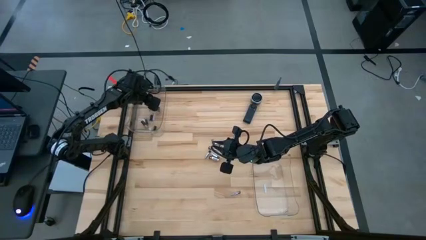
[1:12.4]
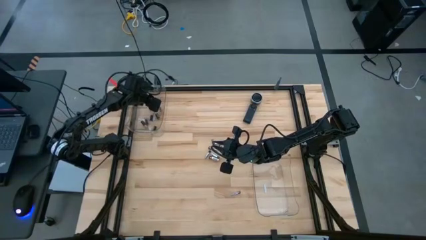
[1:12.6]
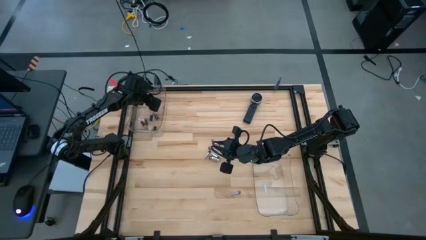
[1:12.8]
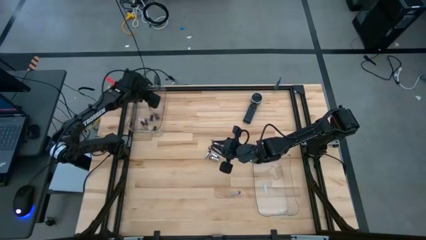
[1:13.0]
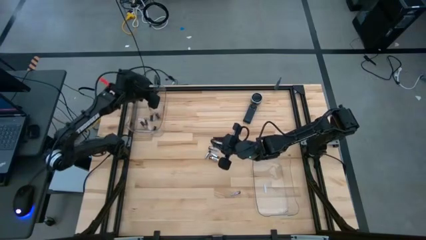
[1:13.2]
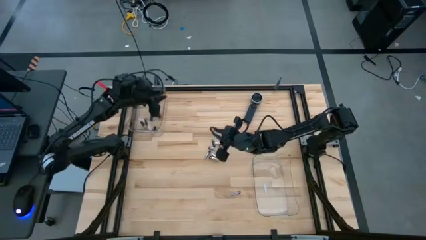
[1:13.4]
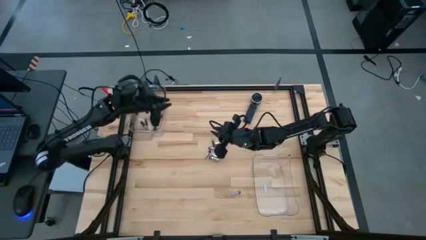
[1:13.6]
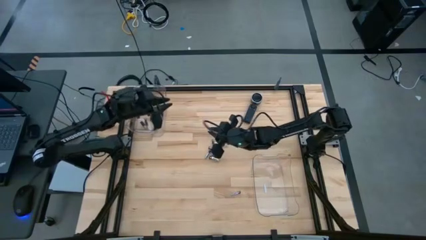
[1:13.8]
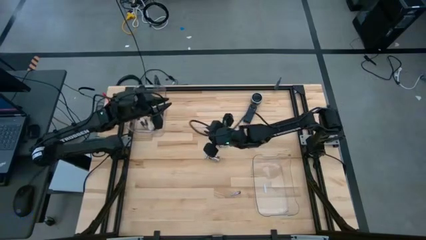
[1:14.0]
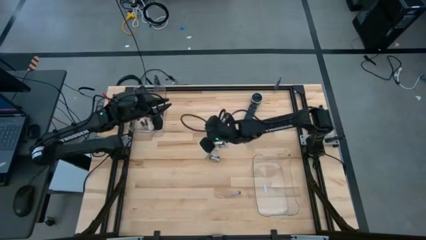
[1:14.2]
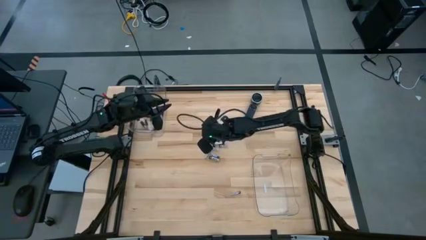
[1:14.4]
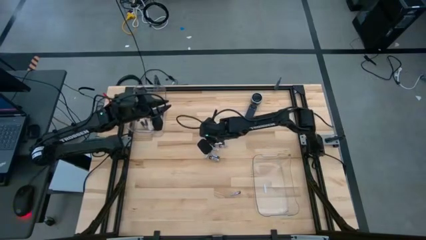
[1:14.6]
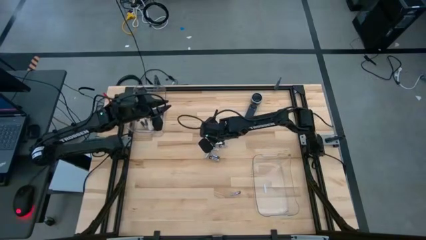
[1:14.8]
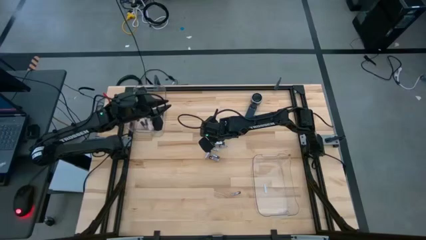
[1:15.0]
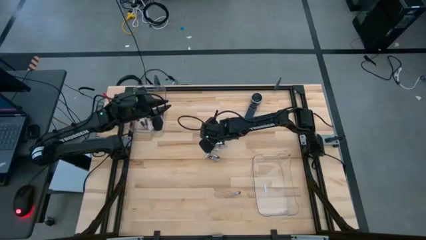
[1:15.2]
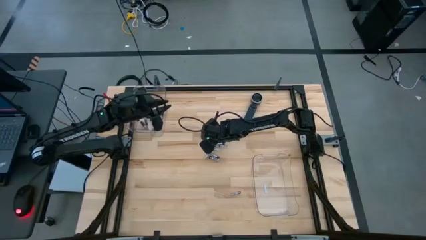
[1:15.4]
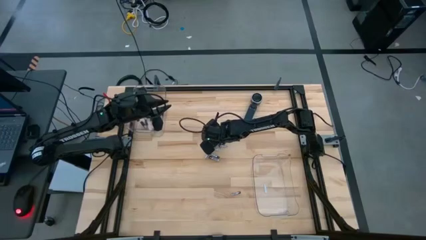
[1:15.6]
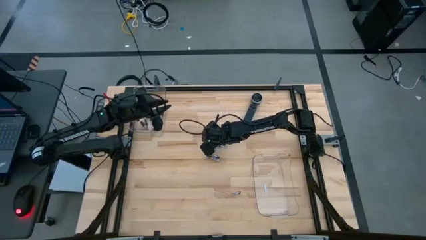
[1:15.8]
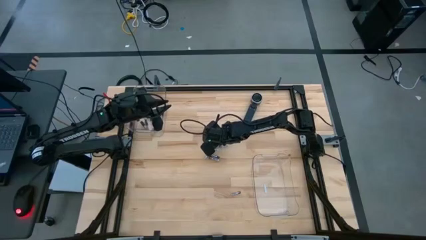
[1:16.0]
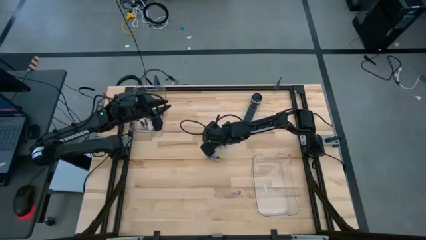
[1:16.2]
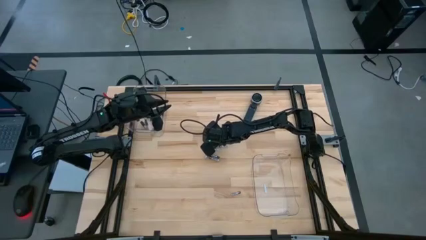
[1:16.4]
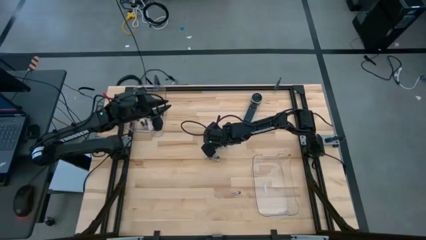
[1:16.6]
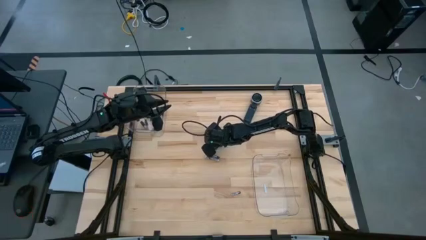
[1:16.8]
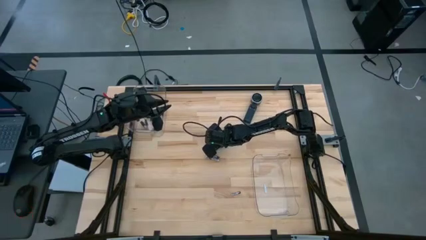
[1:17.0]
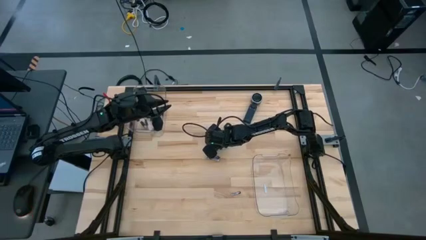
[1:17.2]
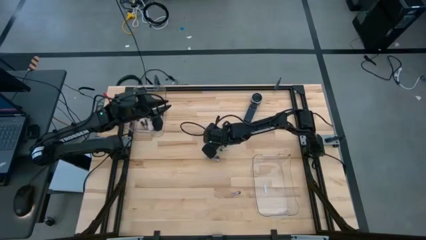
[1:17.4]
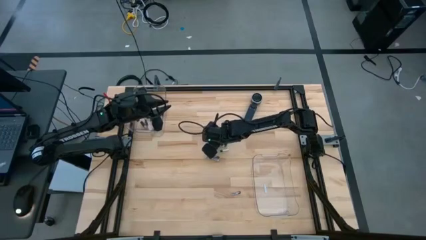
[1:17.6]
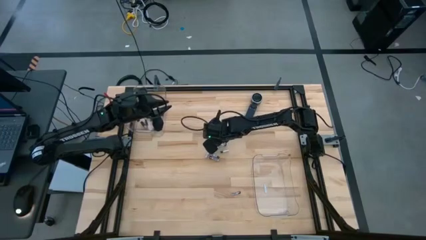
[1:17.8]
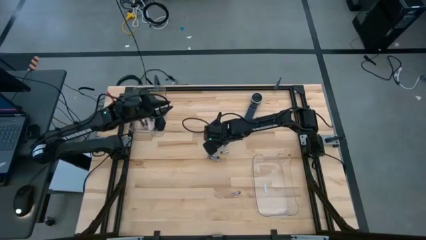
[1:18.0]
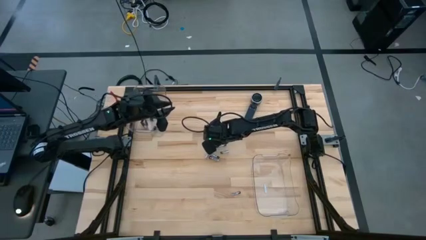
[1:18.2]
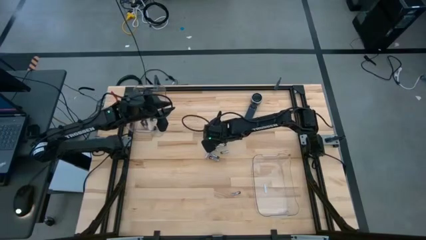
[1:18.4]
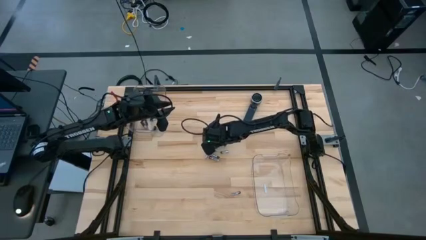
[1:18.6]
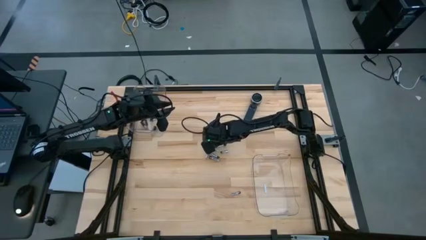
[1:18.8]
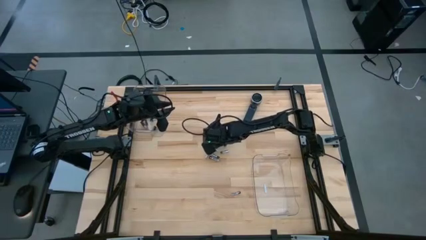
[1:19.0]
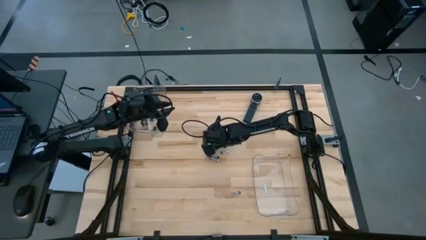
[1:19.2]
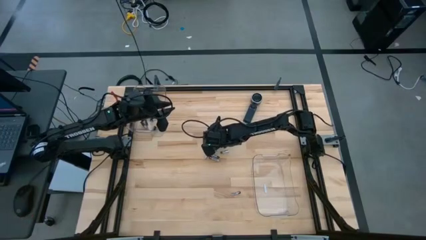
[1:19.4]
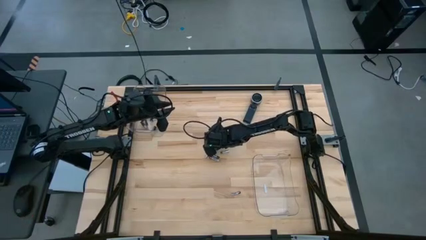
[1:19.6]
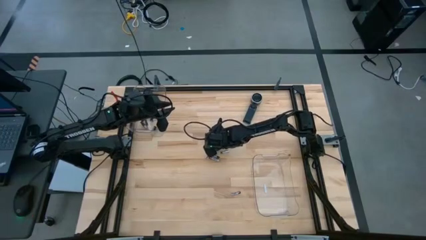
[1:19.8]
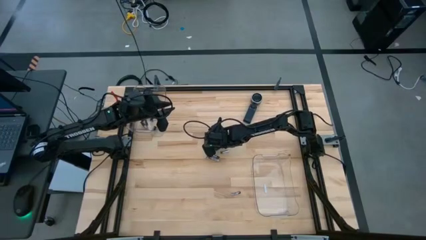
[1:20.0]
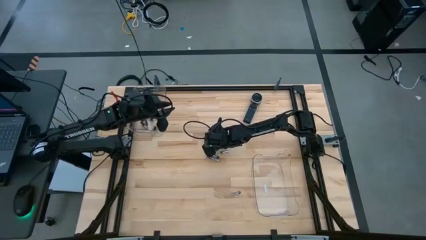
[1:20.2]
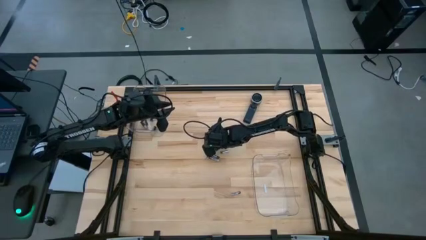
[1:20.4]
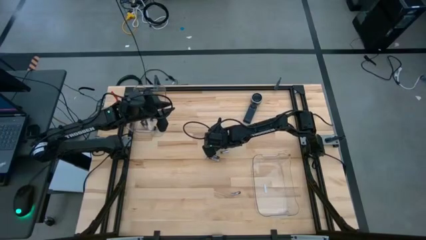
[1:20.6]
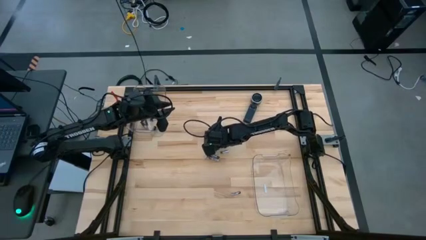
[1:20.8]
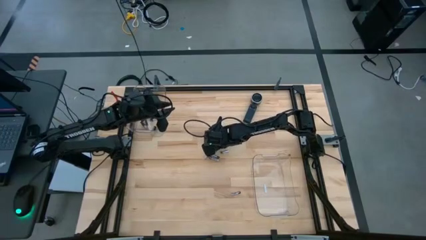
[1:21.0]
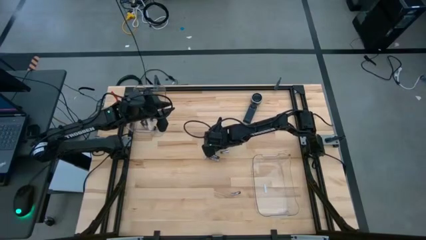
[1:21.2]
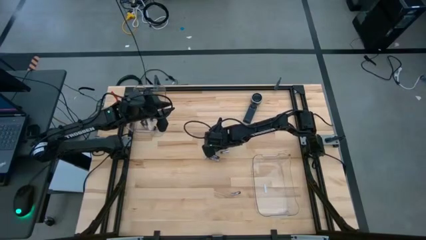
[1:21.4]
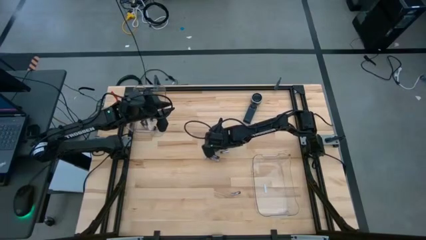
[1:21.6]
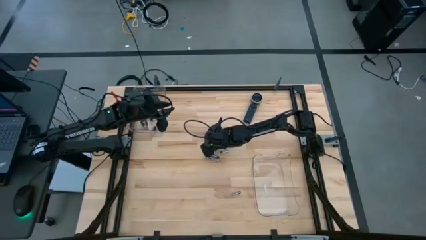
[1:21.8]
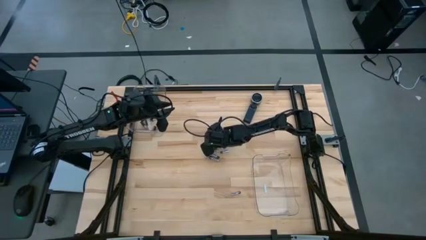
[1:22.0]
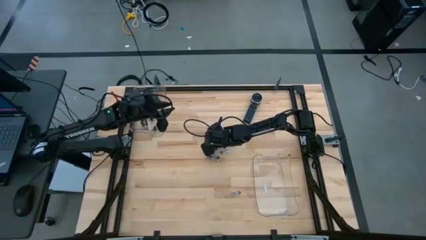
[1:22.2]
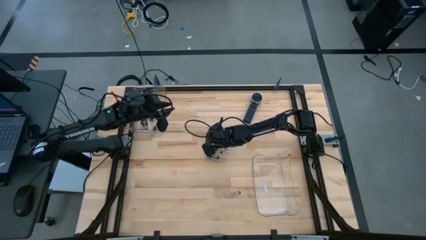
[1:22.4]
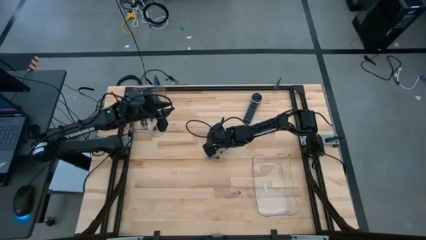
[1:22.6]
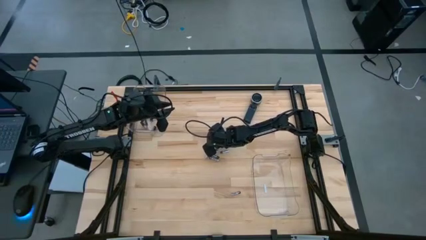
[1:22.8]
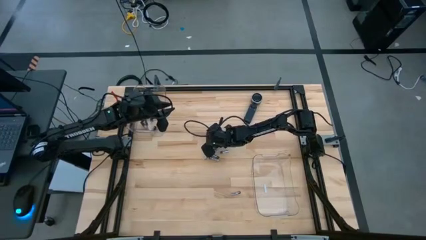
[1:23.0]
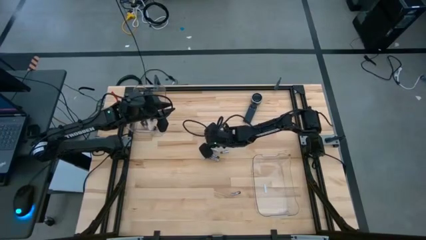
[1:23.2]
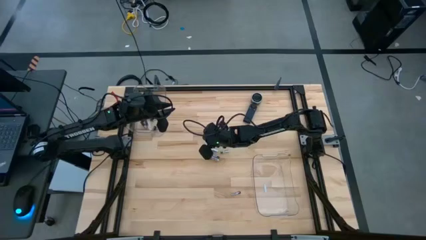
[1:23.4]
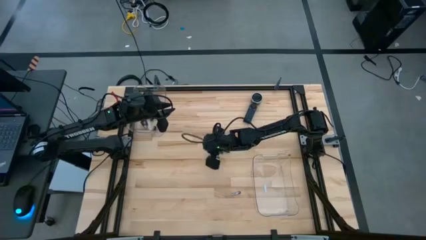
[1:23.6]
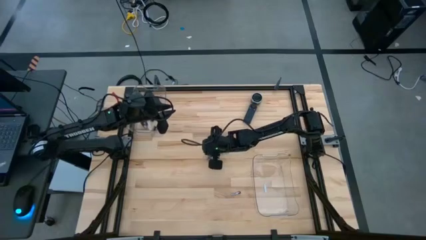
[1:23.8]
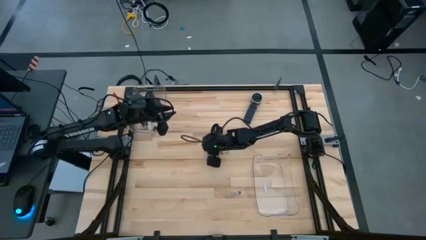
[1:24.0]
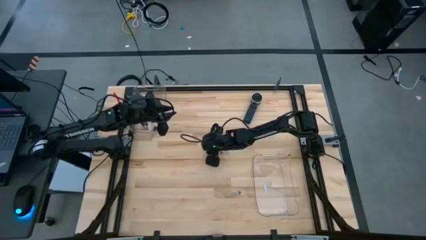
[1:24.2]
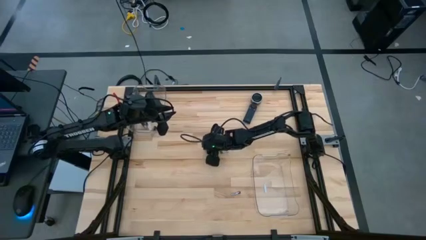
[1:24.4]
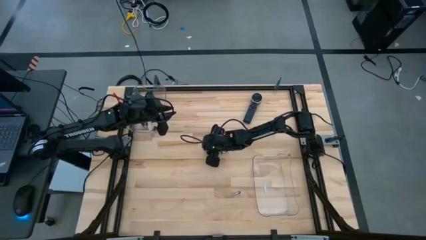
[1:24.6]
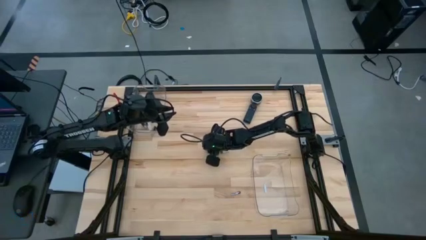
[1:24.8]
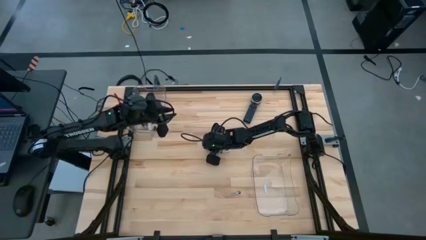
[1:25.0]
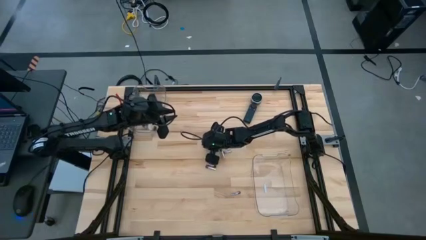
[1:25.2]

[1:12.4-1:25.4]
Task: Sort batteries
Put the black battery into the top transparent bin

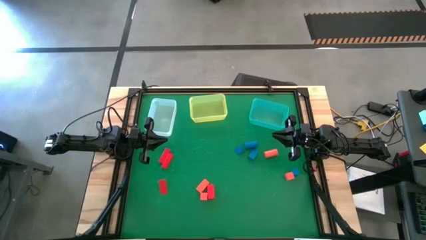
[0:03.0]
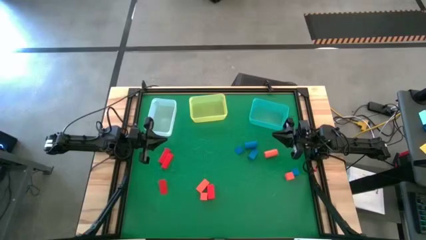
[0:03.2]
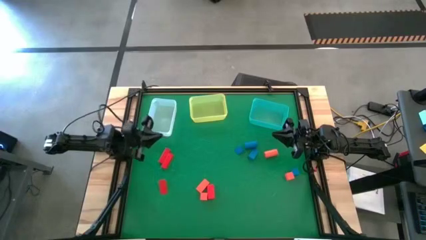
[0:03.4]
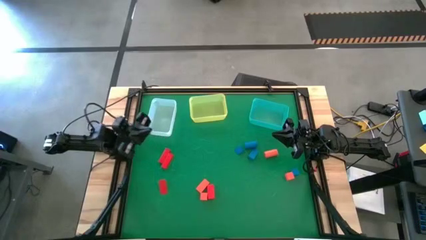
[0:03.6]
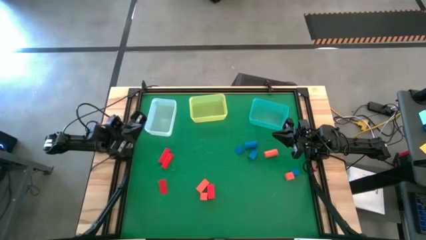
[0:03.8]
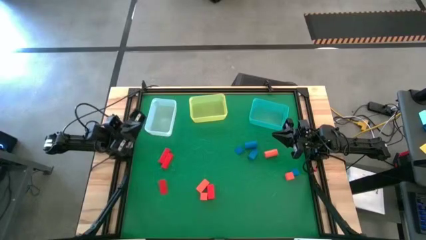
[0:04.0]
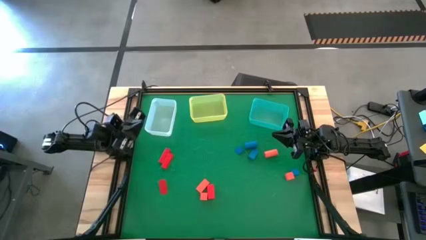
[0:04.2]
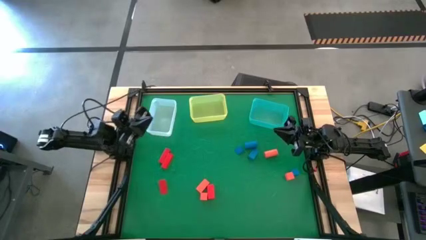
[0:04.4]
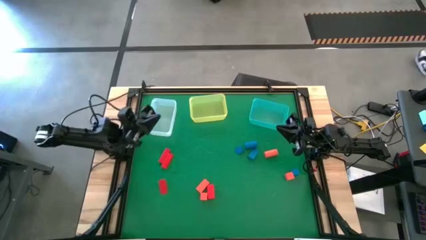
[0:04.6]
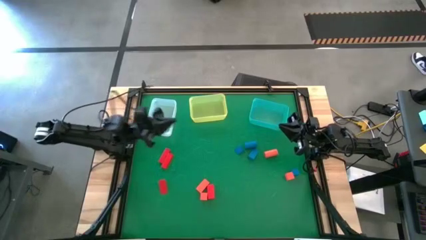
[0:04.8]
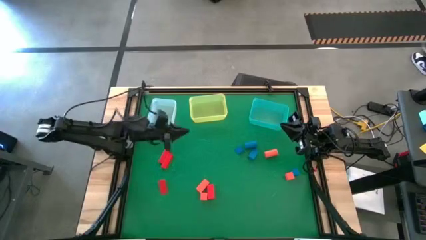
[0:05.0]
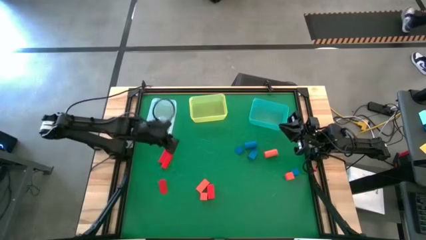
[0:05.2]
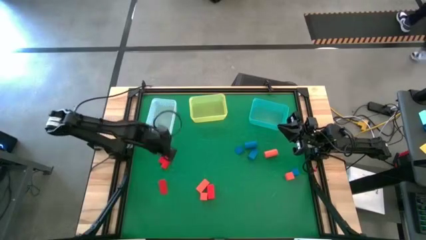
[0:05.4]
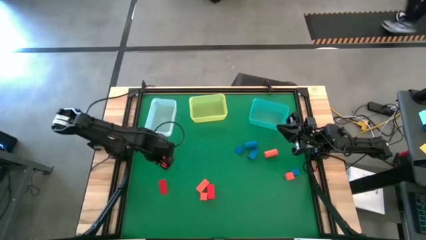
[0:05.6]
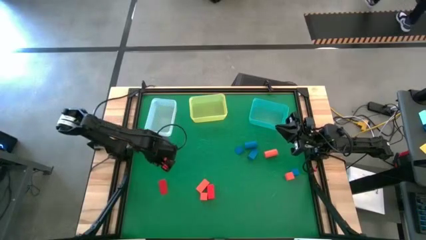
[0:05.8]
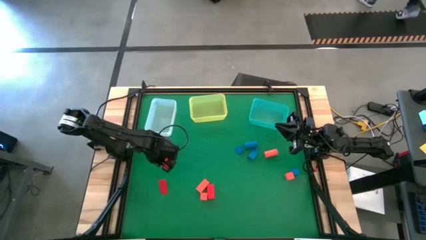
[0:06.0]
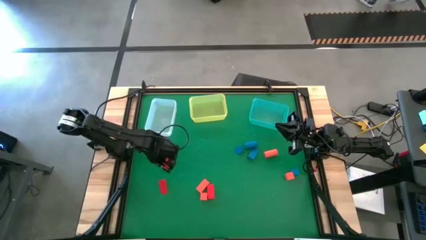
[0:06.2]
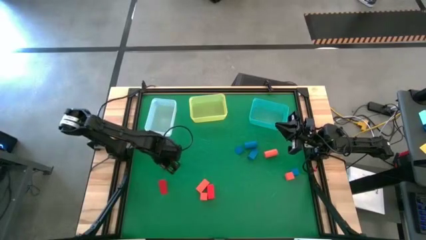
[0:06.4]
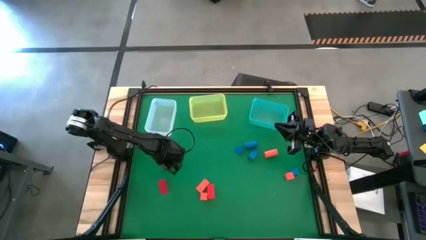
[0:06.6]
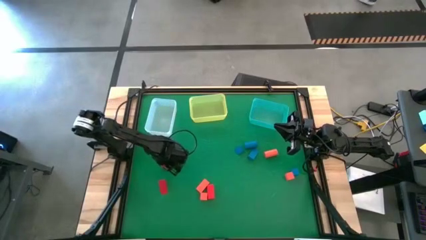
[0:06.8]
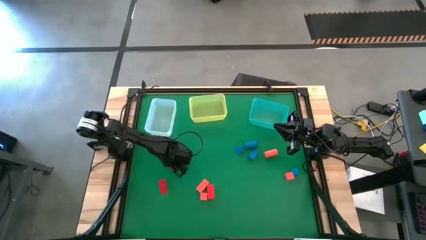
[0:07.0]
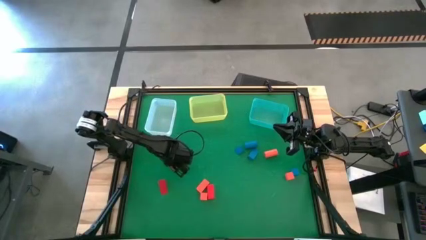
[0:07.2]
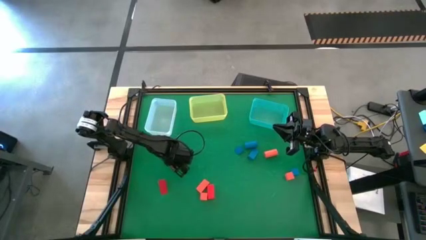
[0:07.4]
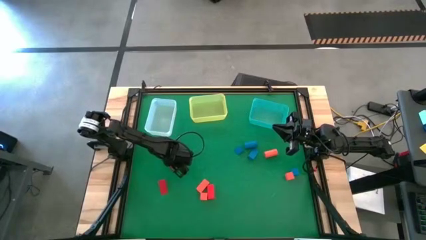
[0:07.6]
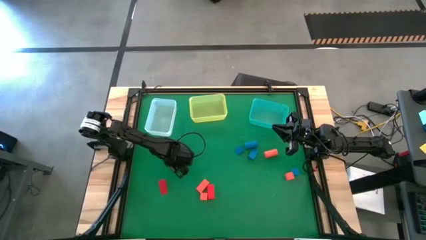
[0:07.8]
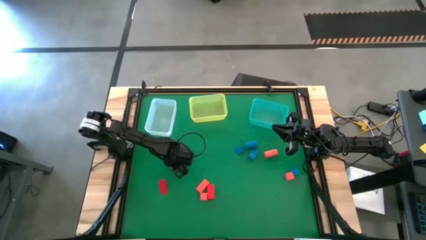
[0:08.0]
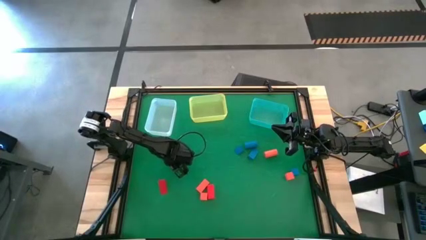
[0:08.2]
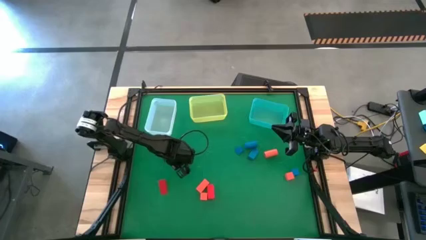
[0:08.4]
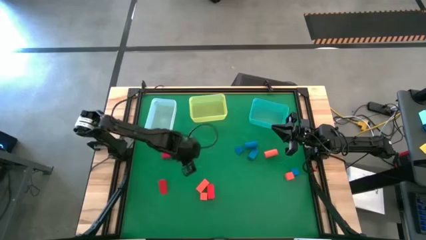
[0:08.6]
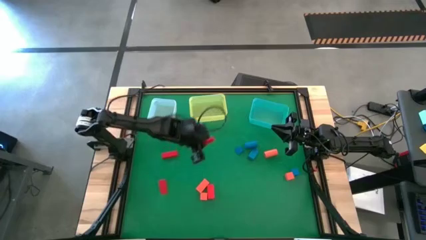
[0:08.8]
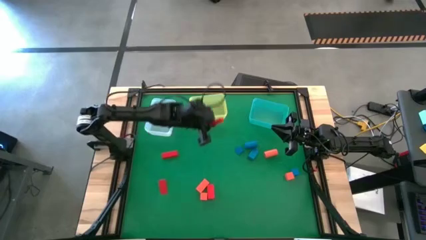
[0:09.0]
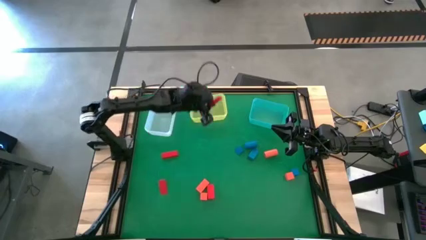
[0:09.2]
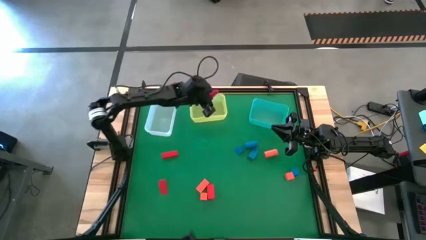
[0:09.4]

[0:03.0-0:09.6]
Task: Sort & place blocks by color
Put the red block into the yellow bin
